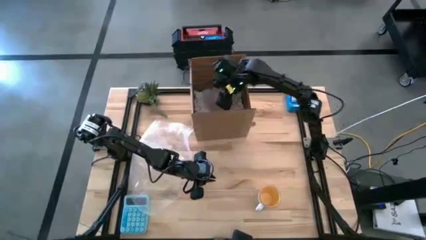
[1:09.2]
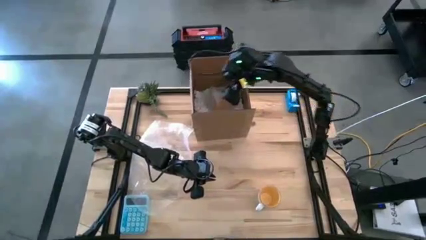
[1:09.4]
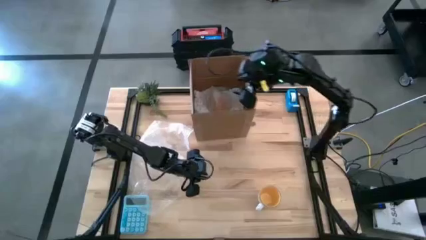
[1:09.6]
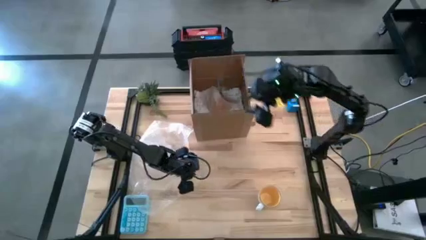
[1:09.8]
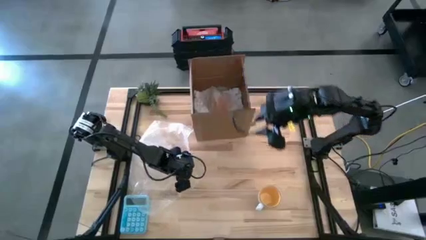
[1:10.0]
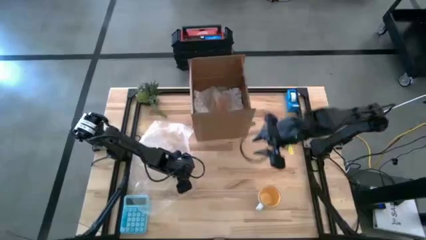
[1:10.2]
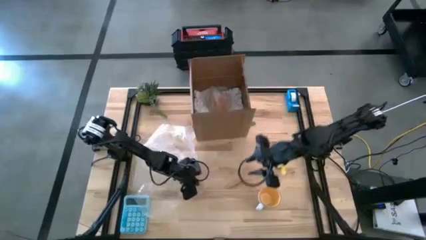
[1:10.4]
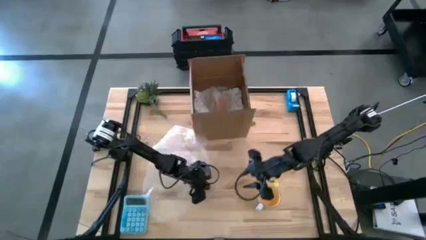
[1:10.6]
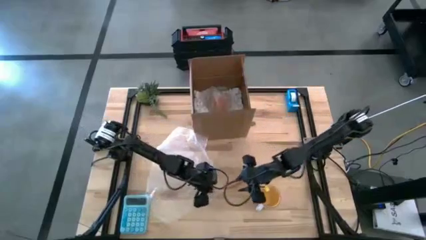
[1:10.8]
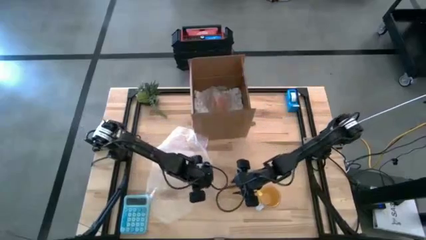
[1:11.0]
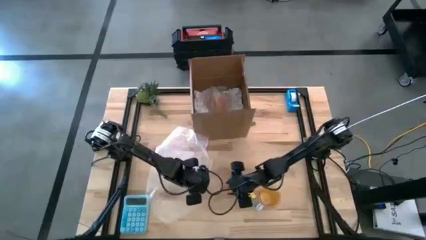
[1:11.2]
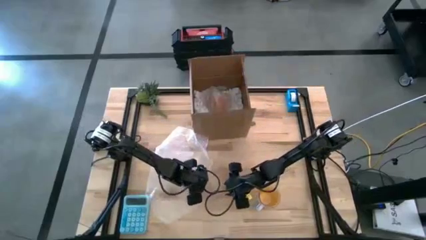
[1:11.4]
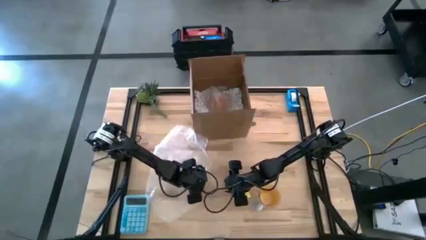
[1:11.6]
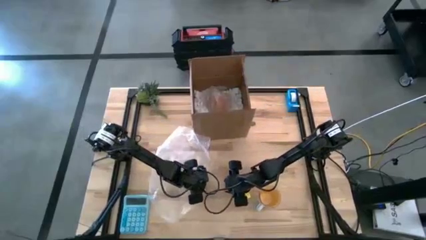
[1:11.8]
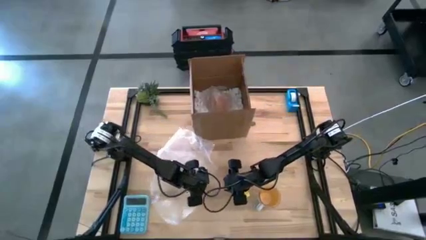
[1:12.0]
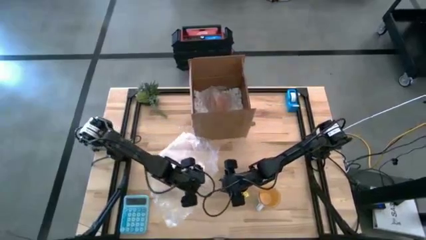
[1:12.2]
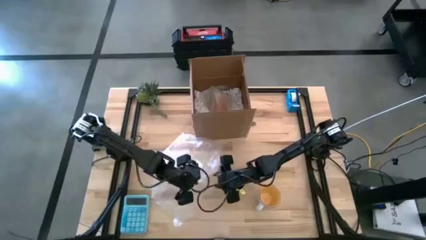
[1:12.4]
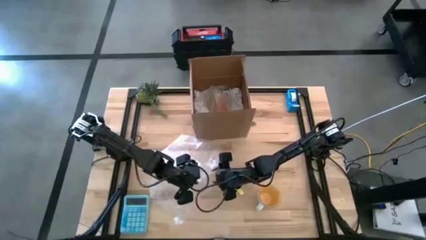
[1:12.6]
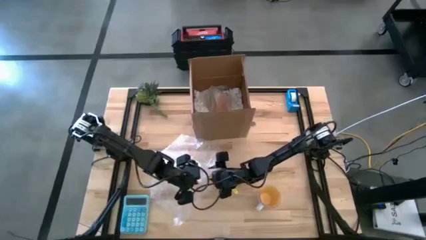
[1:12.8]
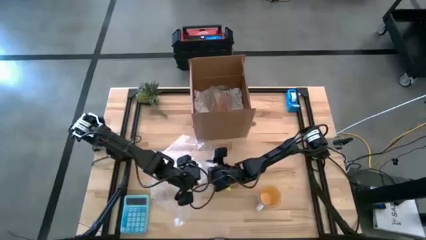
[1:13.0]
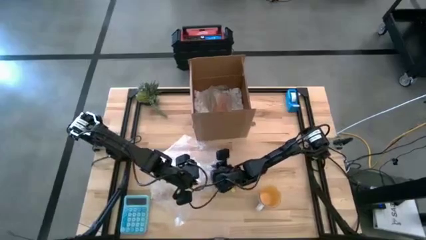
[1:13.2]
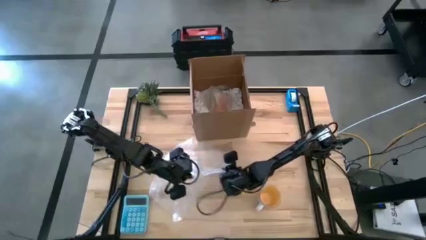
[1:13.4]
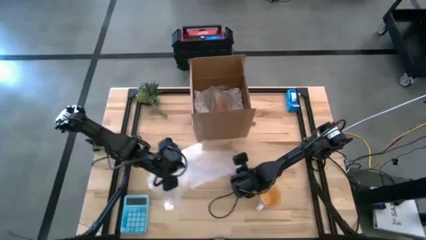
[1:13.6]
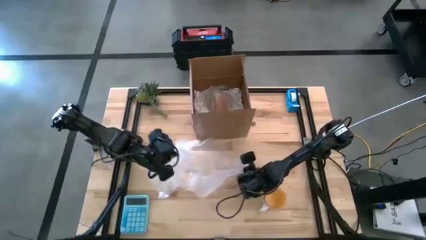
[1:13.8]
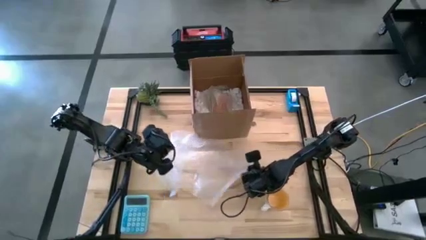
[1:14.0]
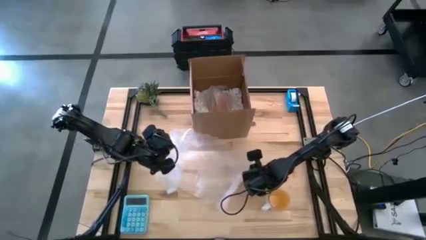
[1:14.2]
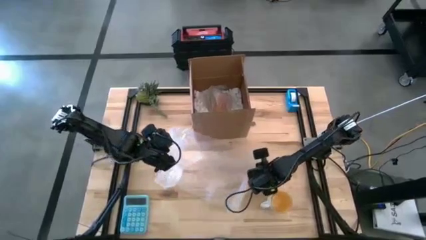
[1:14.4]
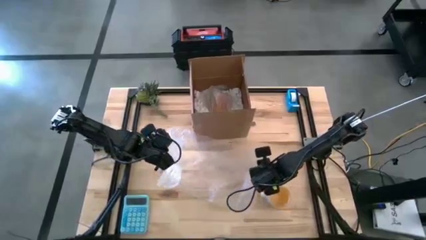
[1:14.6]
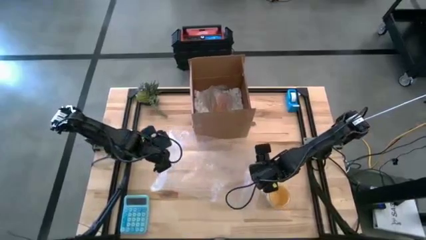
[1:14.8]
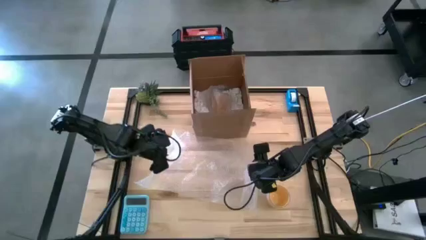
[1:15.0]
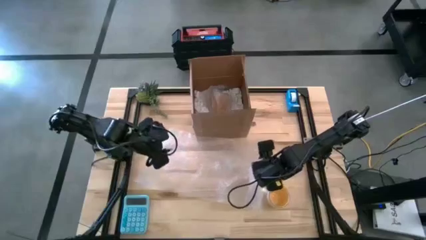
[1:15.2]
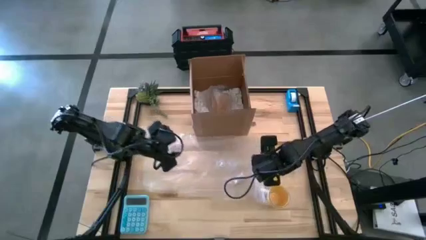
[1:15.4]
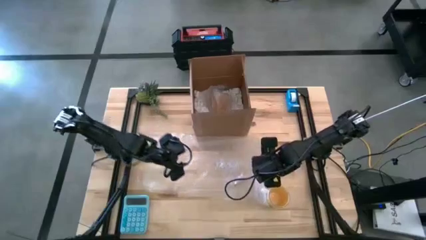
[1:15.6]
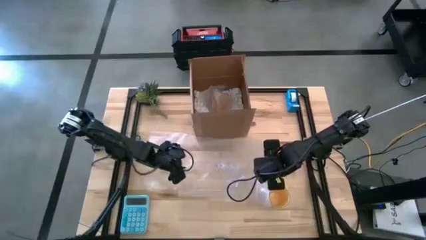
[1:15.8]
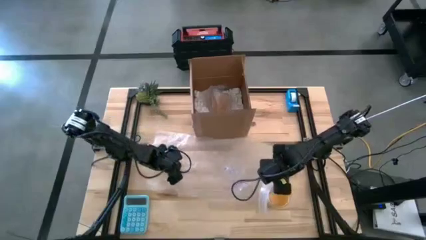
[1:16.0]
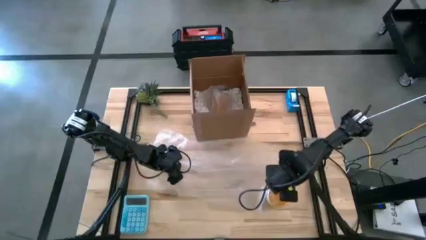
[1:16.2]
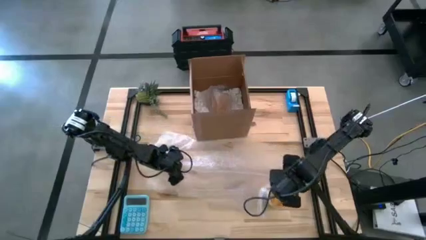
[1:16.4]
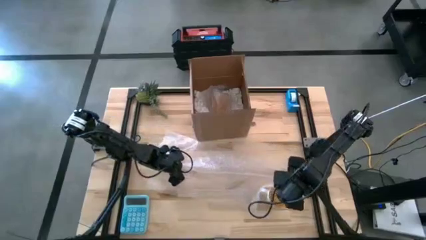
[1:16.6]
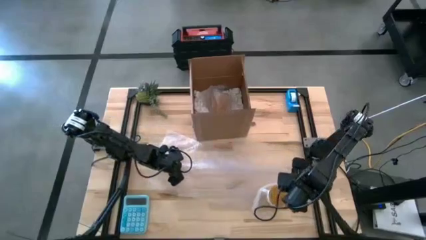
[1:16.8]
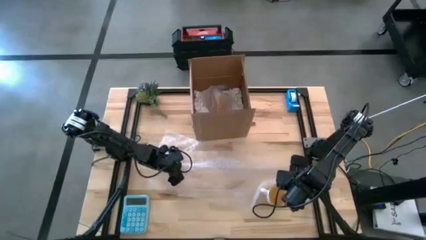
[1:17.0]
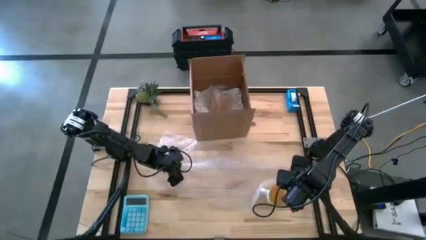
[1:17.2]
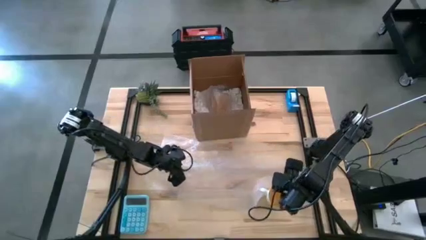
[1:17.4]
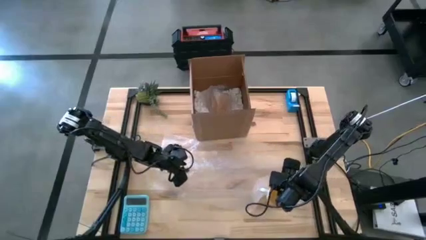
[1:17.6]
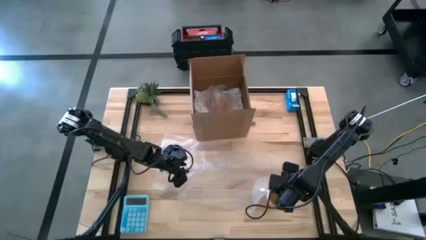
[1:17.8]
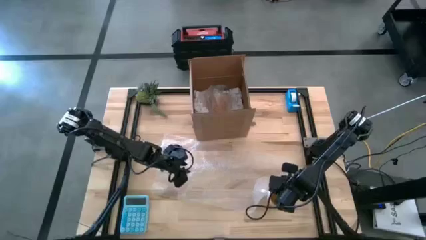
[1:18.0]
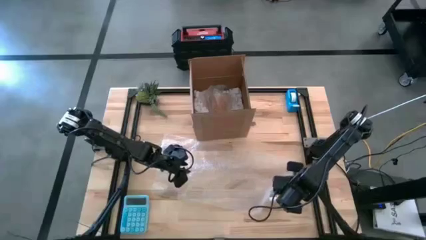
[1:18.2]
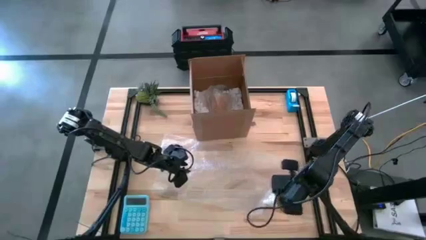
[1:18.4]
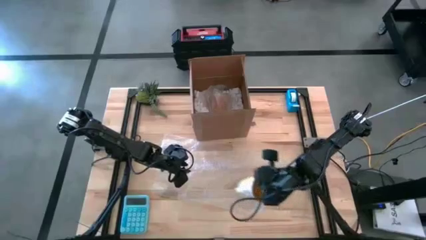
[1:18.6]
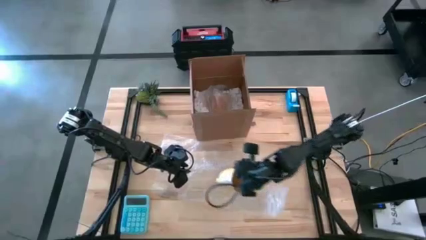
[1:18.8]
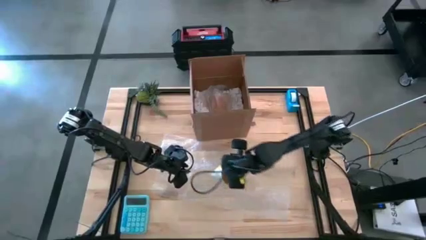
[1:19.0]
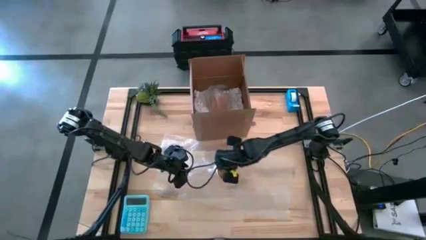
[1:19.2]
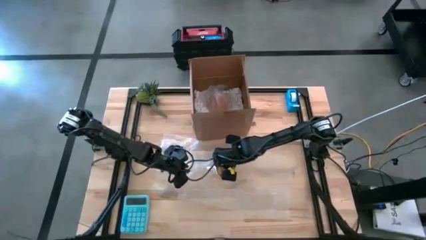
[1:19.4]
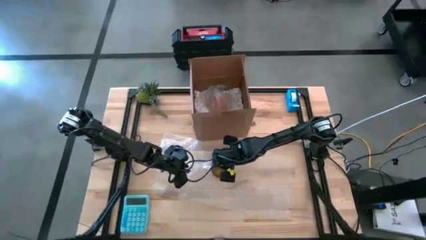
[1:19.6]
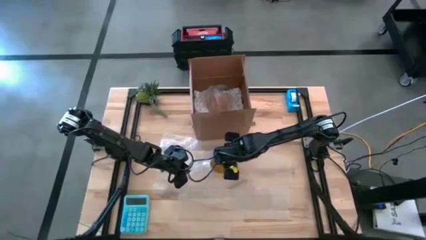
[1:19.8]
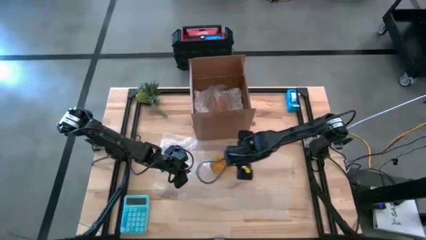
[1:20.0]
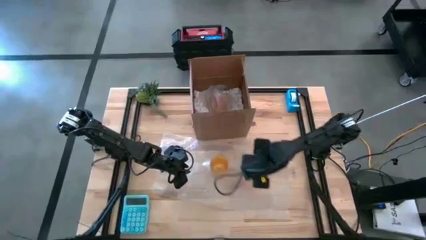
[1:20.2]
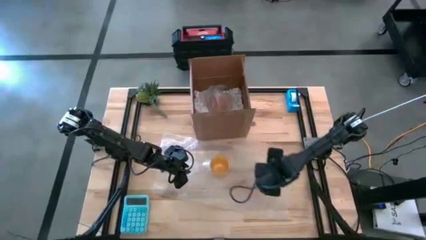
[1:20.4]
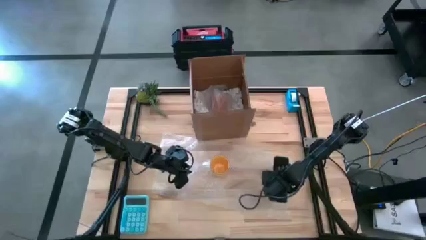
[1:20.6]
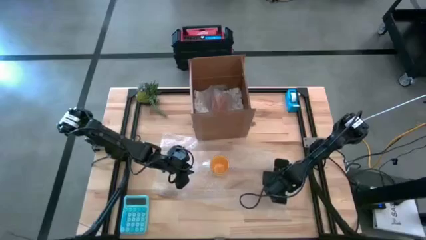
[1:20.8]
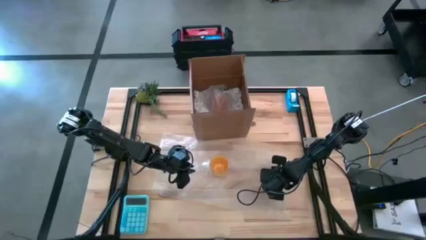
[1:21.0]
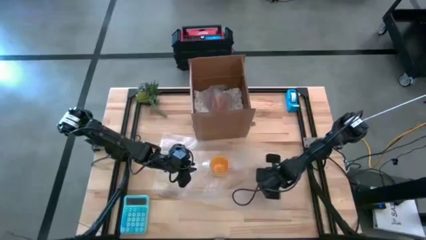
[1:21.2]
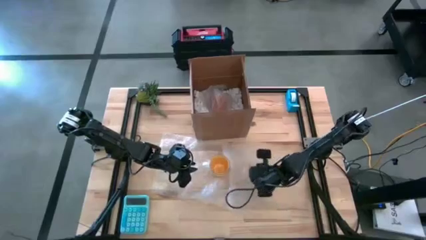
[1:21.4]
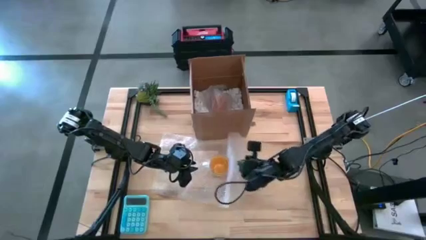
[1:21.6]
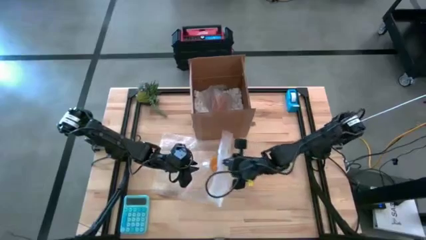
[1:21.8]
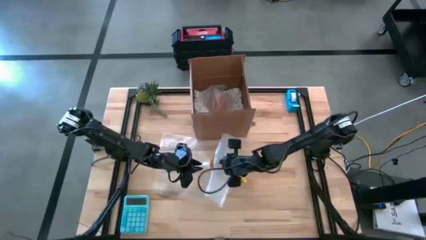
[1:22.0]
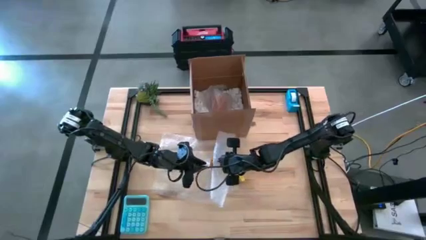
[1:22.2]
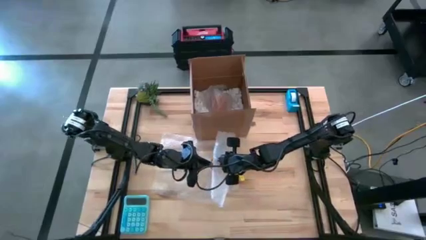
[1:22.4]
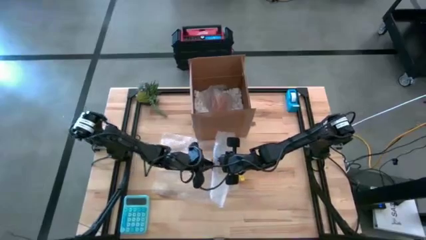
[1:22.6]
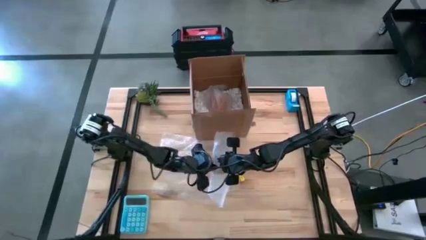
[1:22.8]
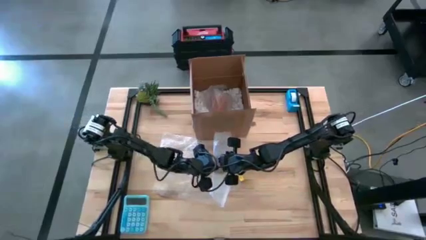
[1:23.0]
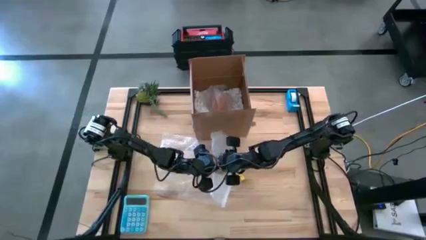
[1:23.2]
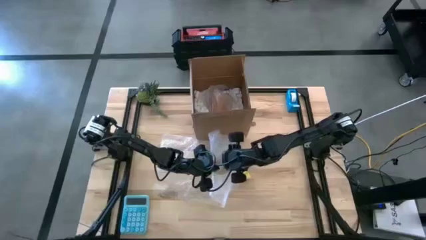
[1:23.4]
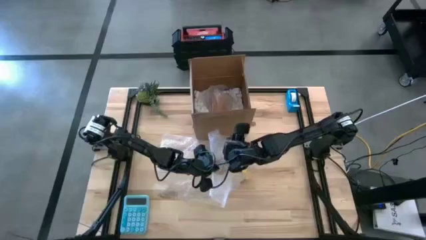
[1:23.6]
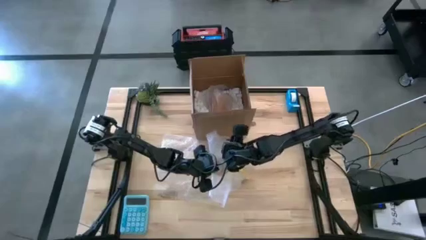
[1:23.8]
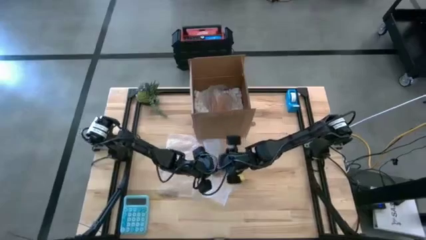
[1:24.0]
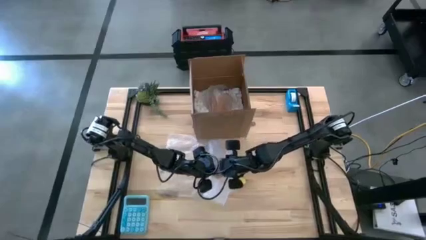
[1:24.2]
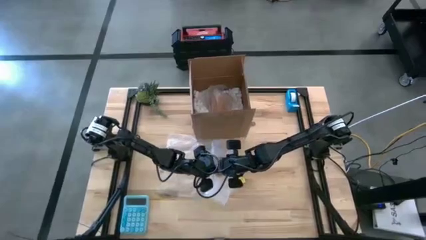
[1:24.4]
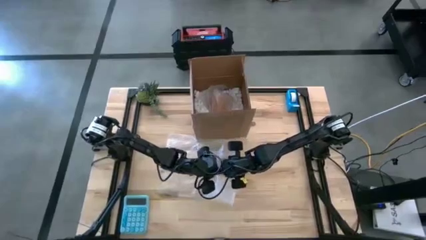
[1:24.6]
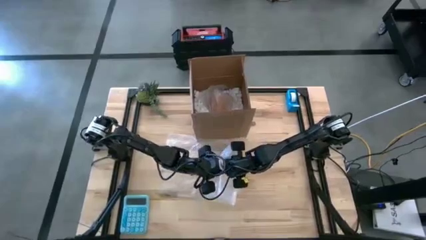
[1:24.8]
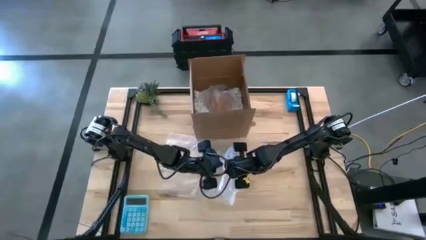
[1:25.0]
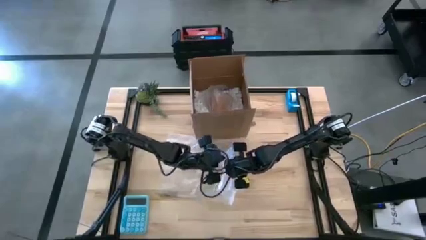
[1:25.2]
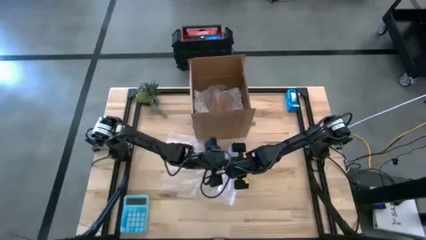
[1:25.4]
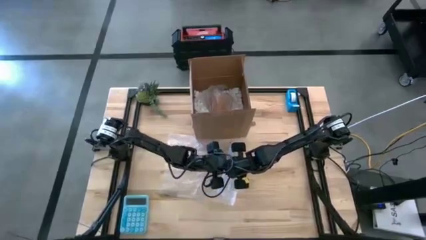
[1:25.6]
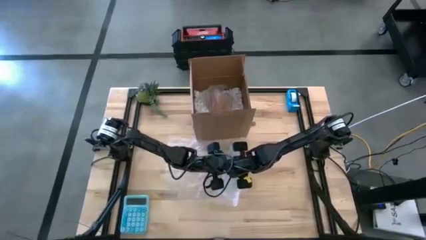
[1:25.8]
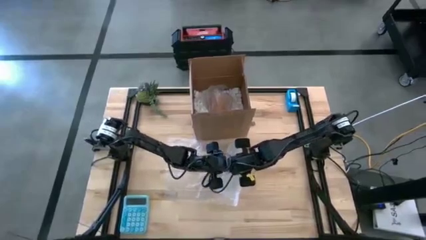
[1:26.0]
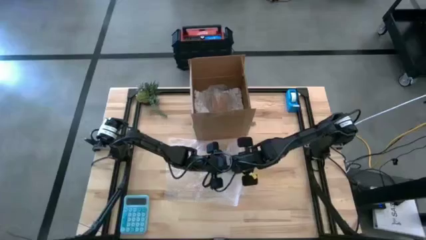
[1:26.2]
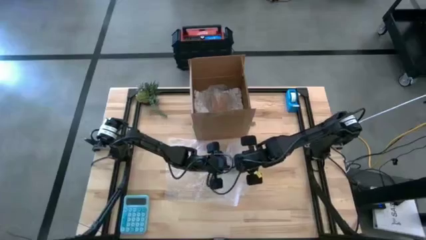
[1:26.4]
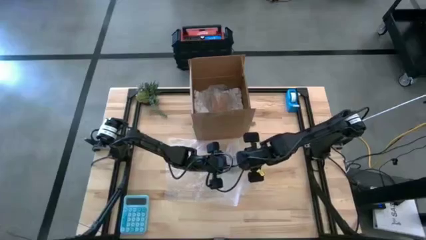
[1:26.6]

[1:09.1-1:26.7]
Task: wrap mug
Wrap the yellow mug with bubble wrap
